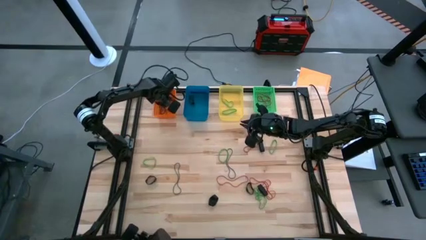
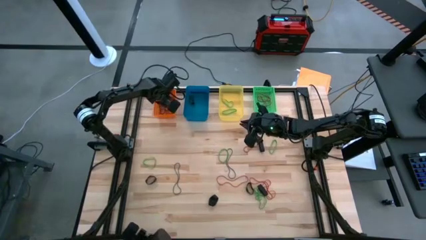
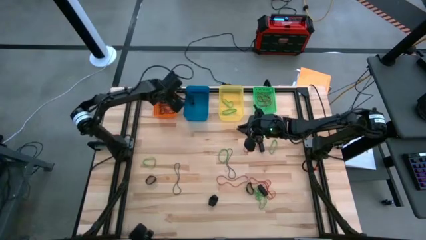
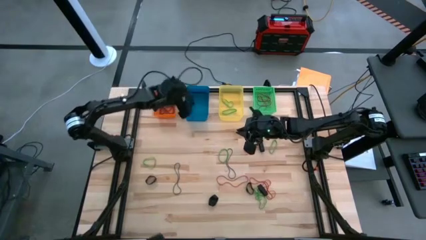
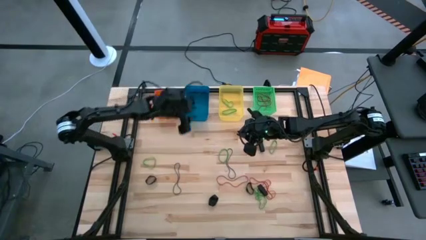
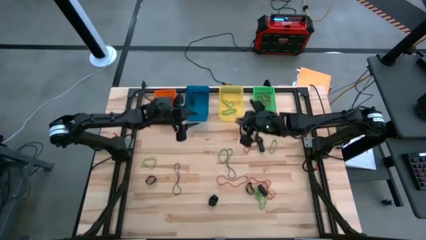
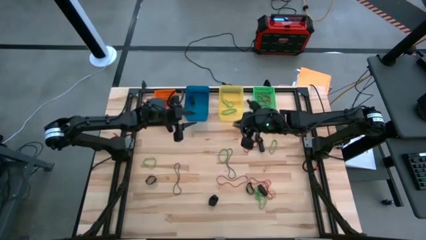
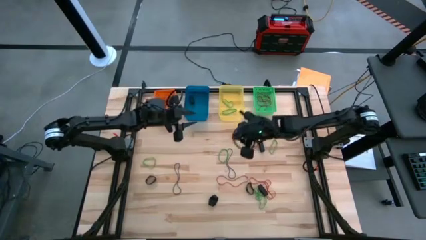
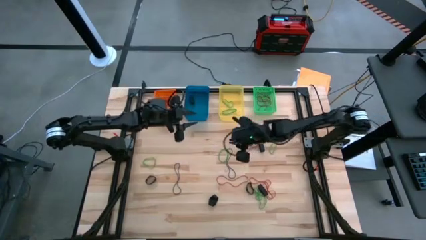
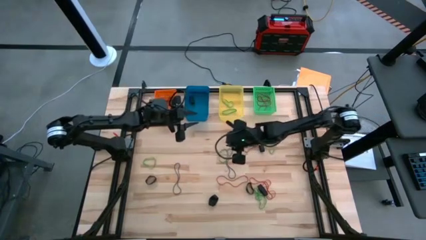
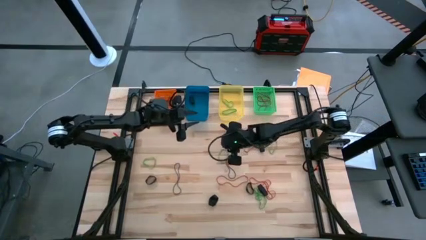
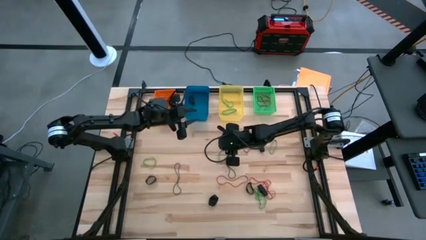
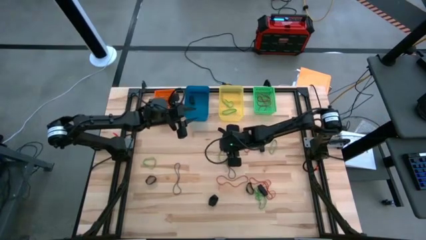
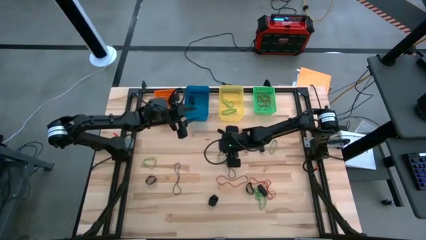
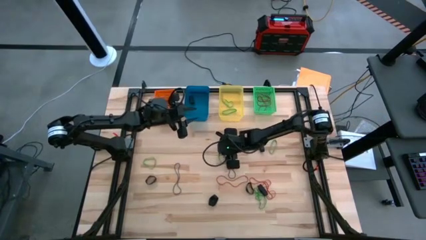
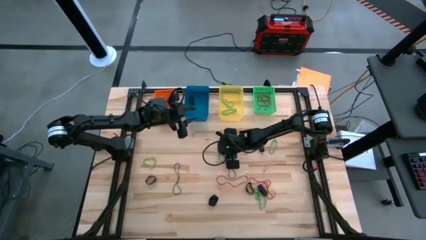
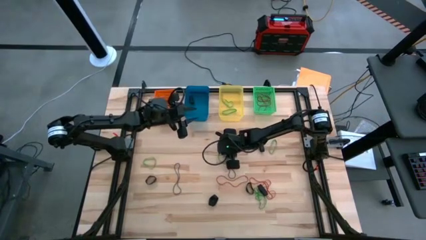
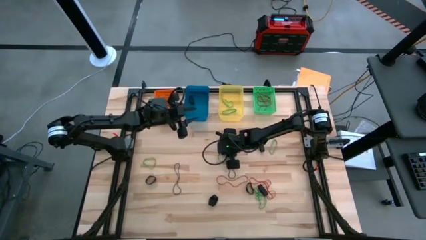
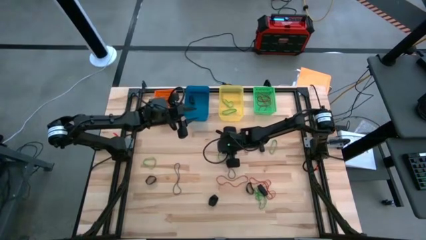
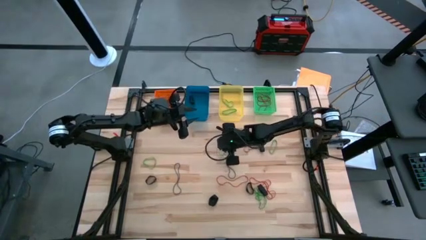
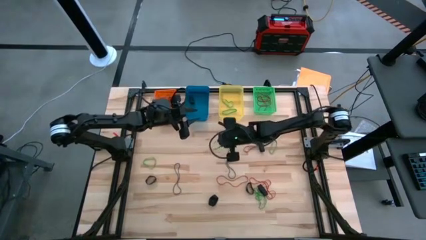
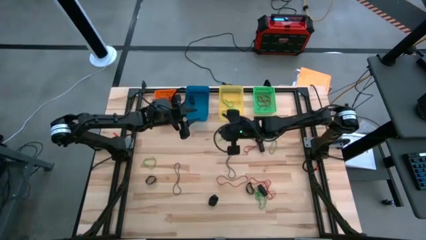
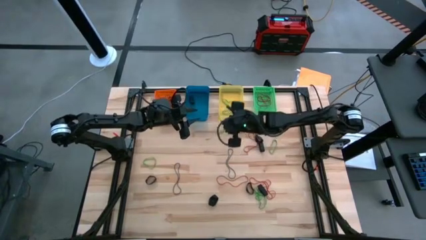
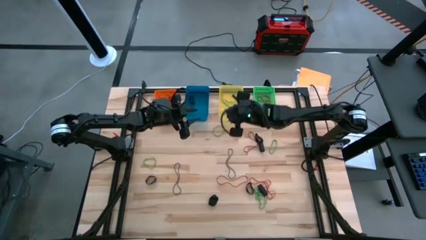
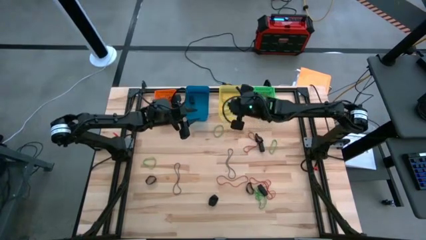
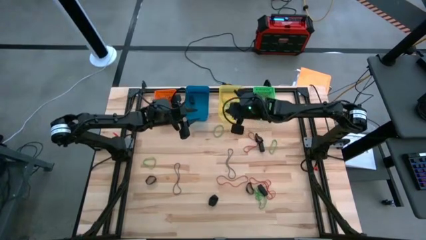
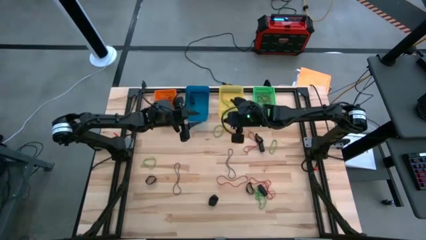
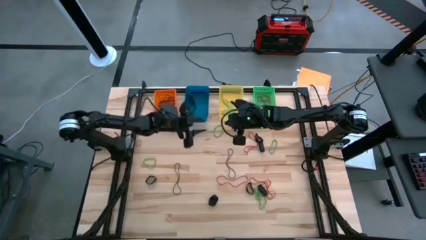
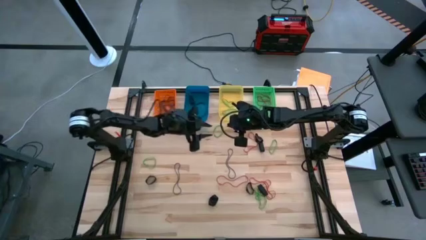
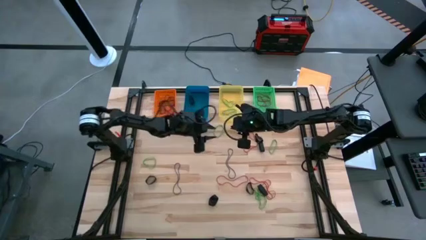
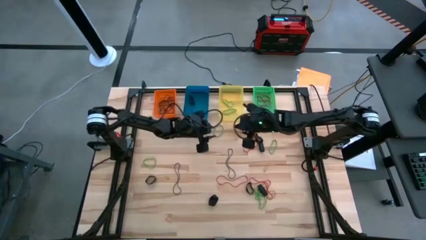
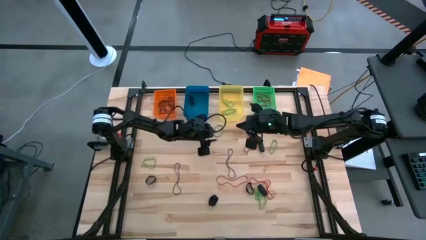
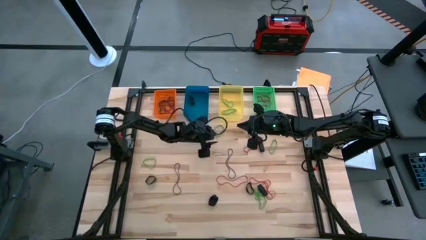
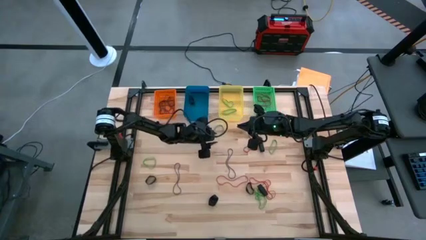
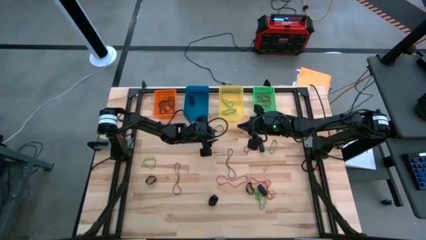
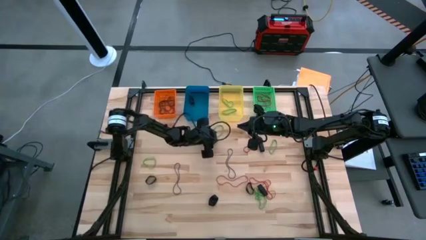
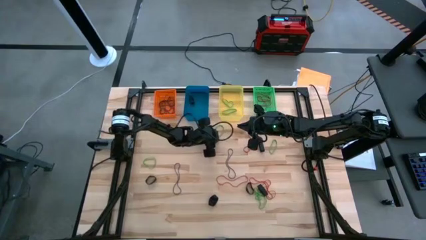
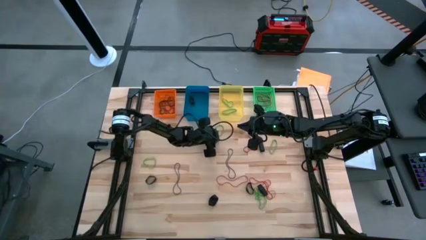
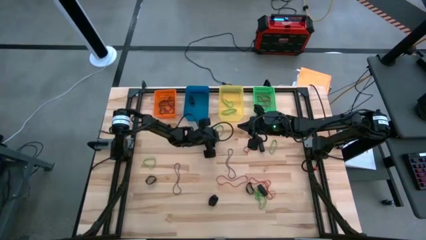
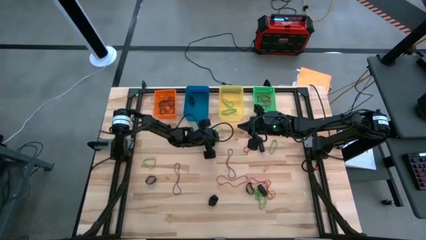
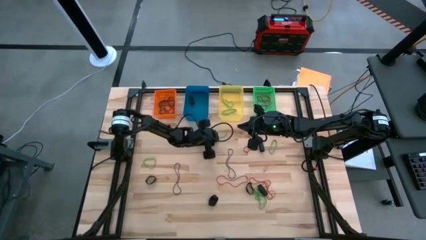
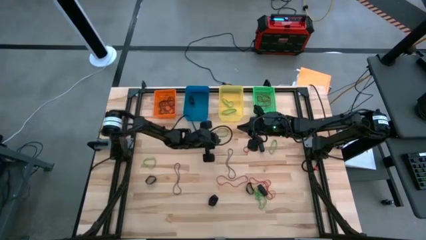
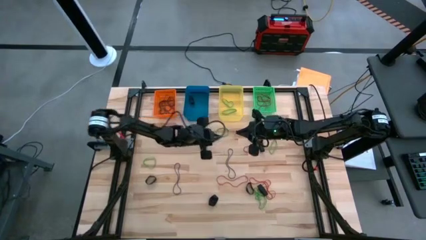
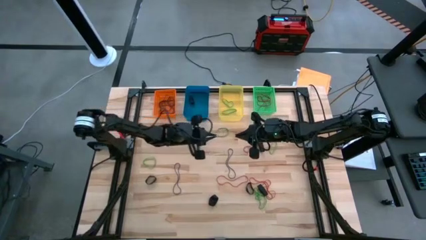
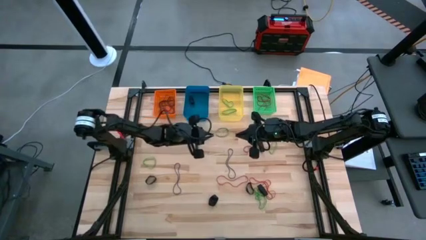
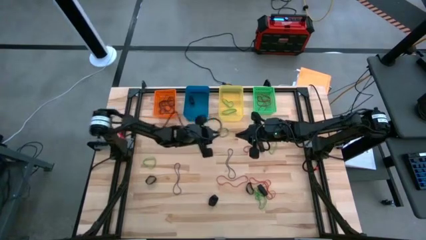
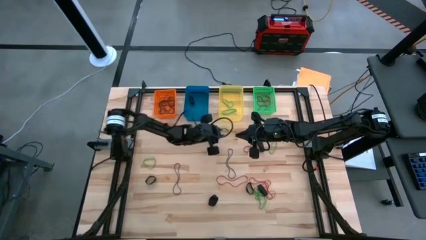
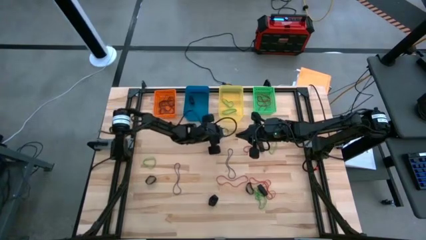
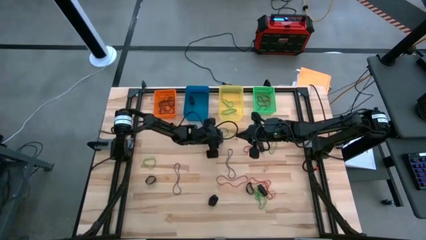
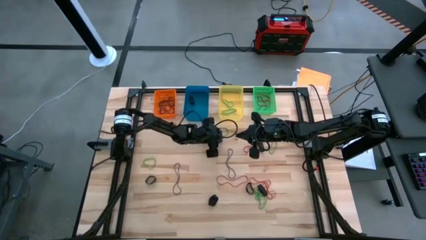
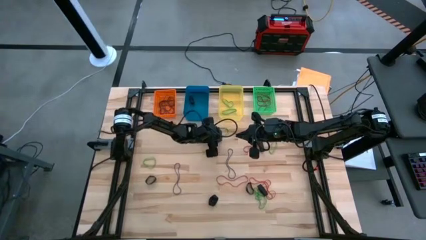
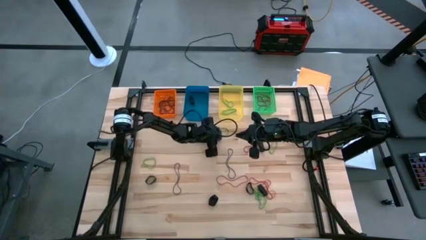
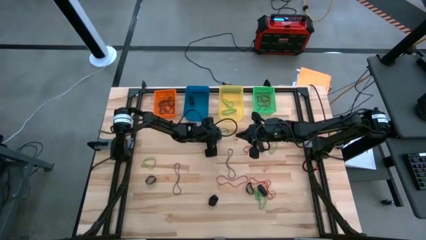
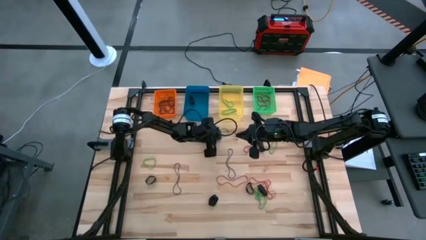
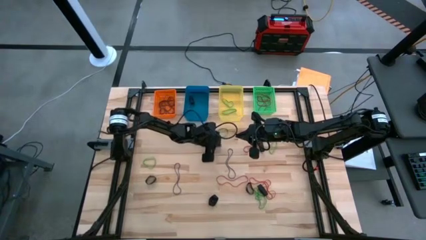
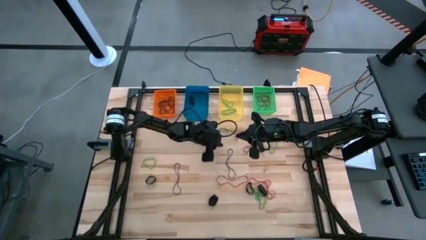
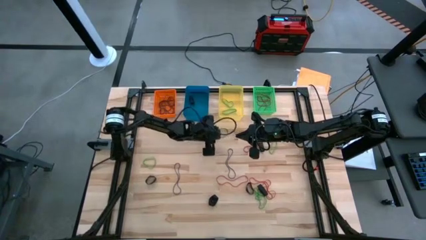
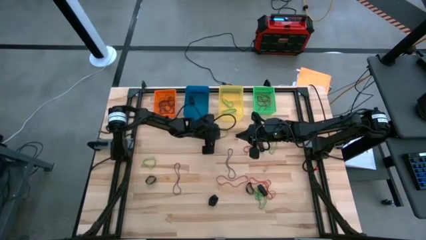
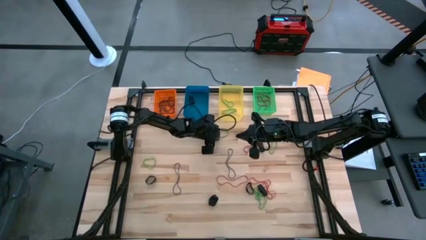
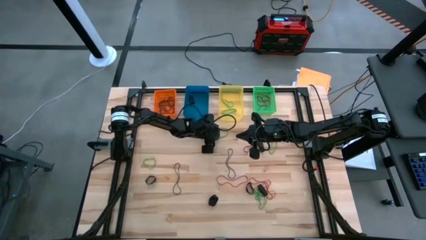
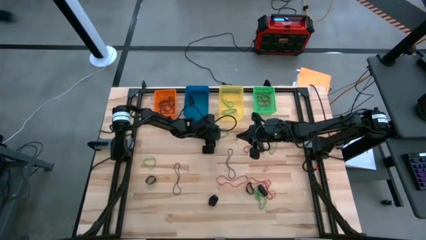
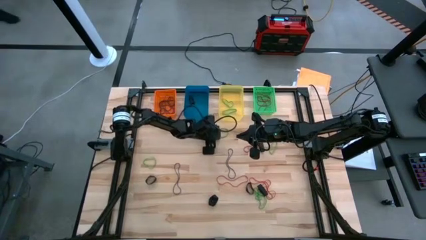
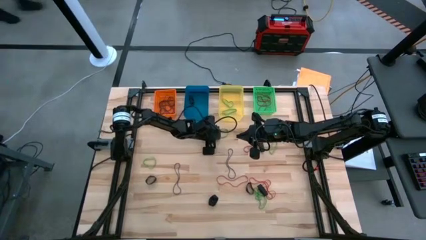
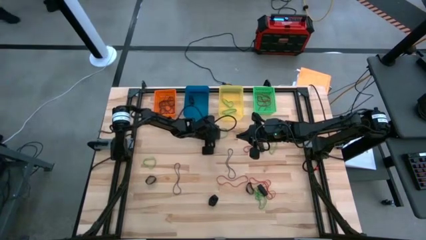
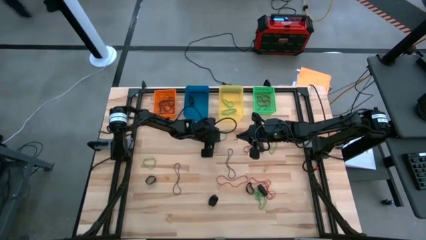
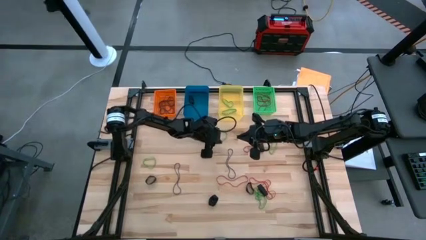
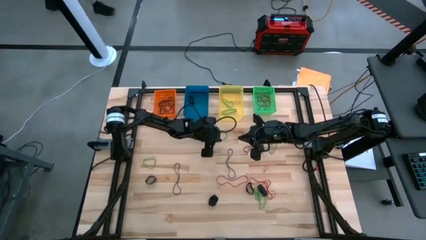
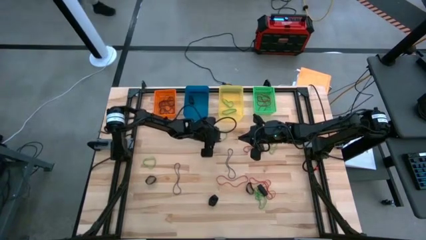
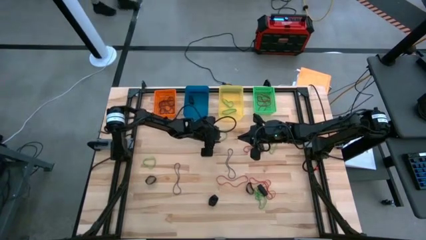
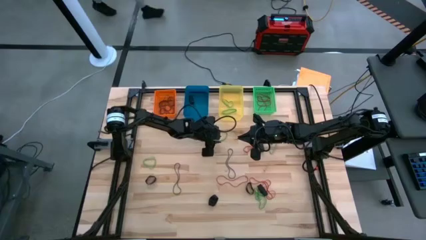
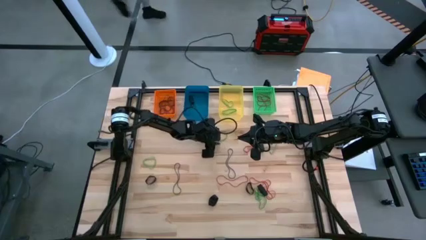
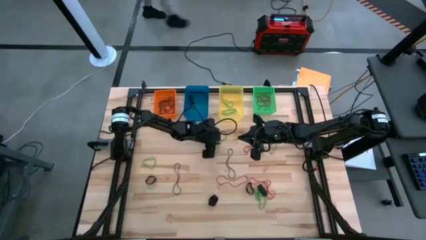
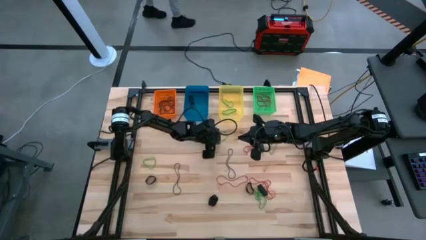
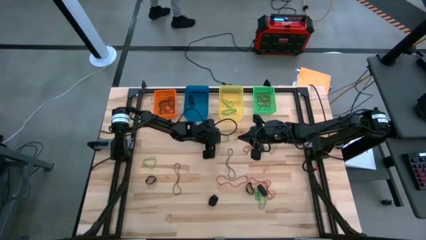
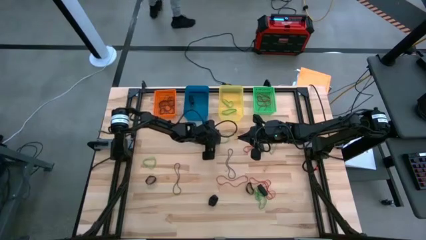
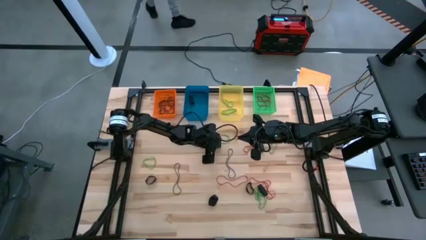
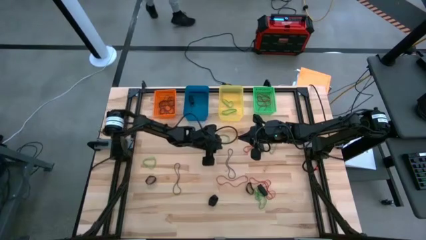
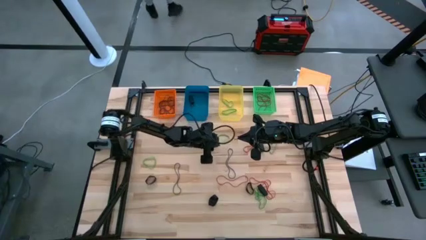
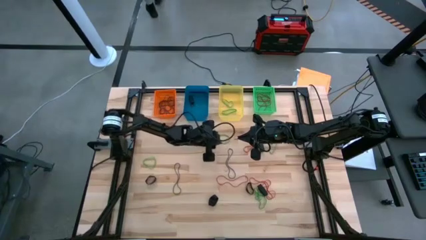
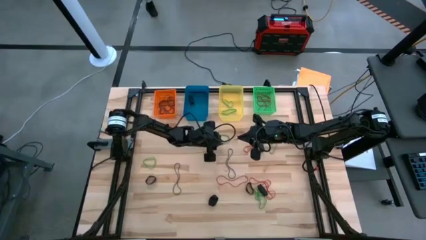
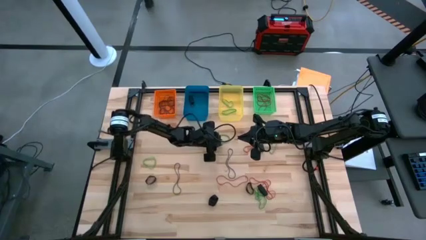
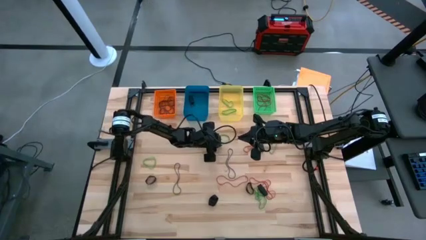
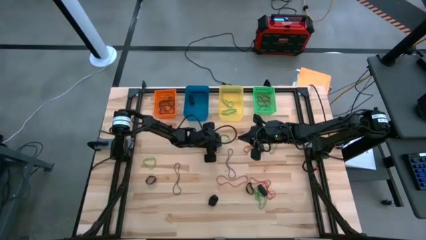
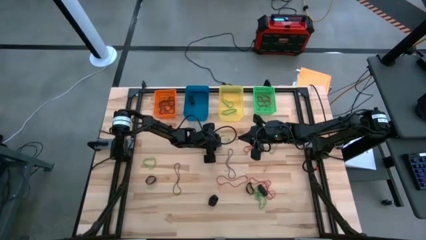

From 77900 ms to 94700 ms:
Task: Sort rubber bands into baskets
Put the green rubber band into the yellow bin
